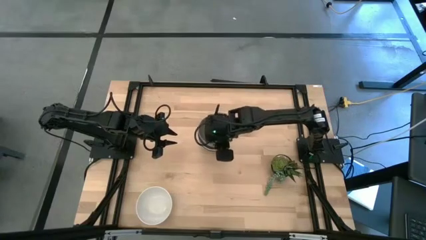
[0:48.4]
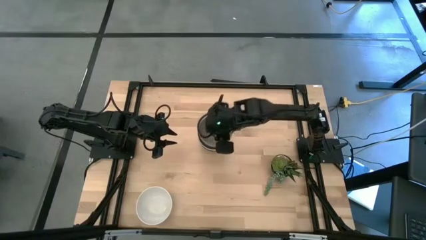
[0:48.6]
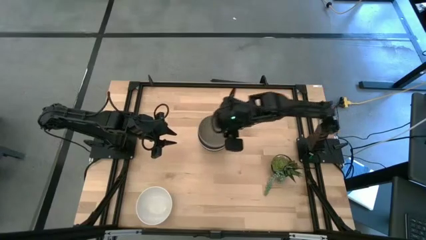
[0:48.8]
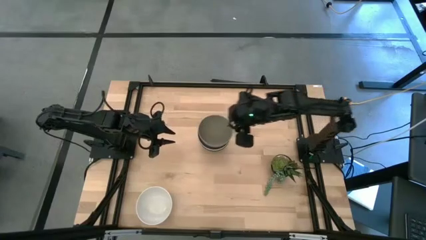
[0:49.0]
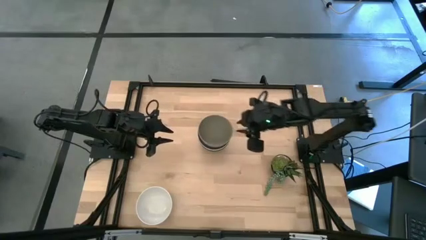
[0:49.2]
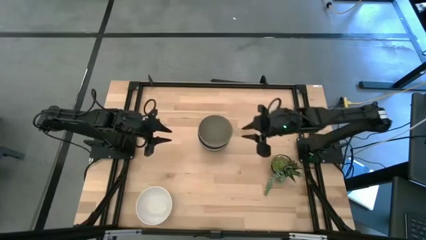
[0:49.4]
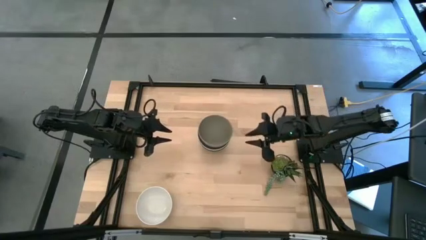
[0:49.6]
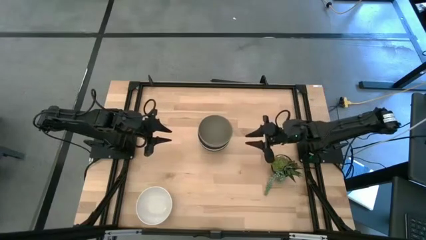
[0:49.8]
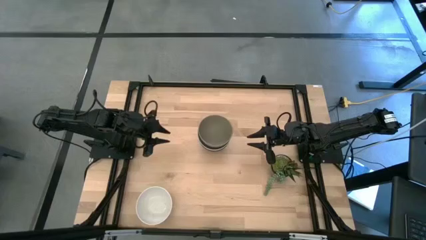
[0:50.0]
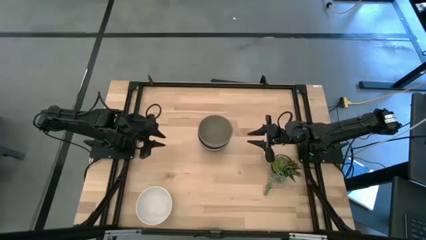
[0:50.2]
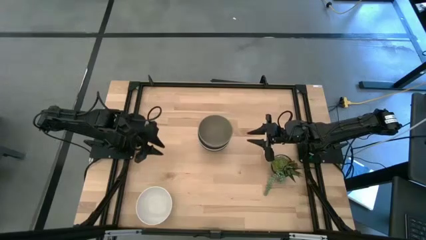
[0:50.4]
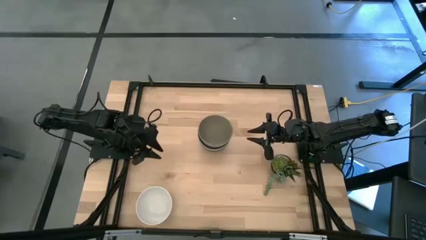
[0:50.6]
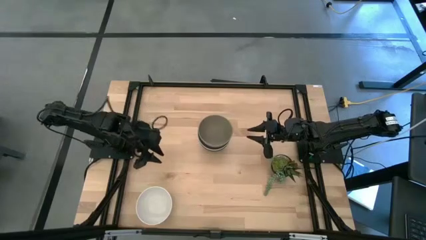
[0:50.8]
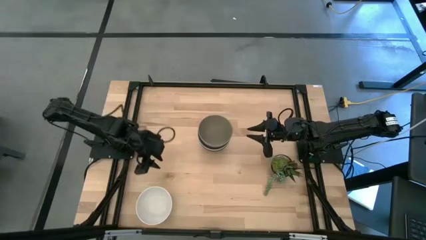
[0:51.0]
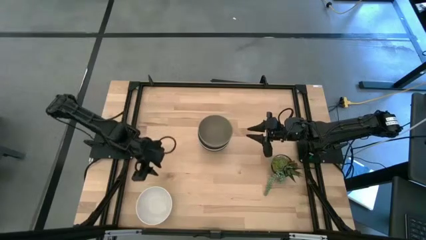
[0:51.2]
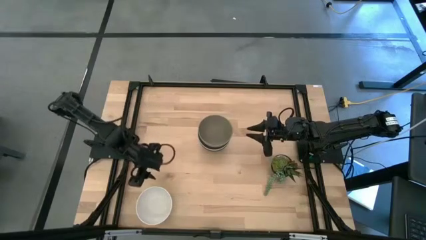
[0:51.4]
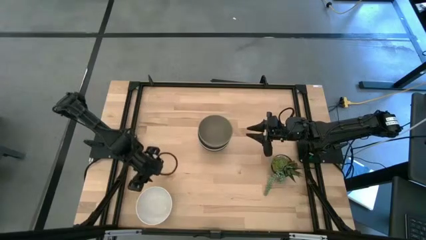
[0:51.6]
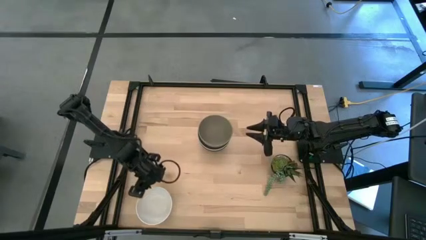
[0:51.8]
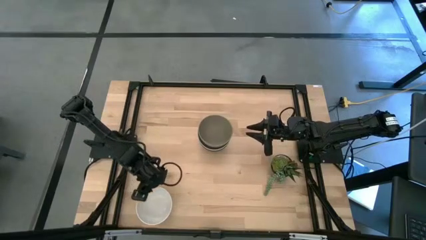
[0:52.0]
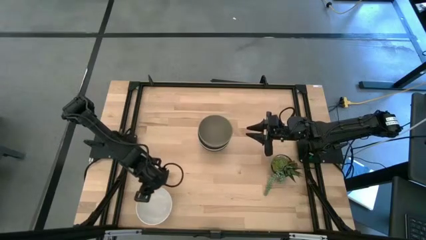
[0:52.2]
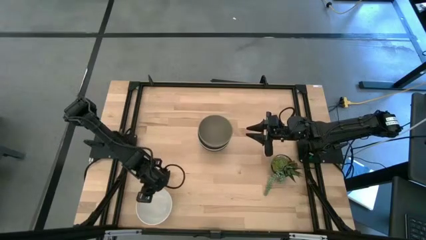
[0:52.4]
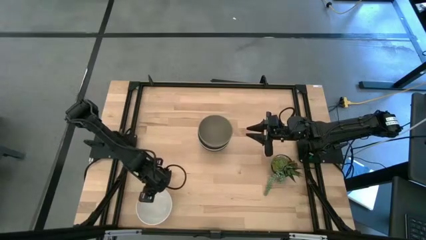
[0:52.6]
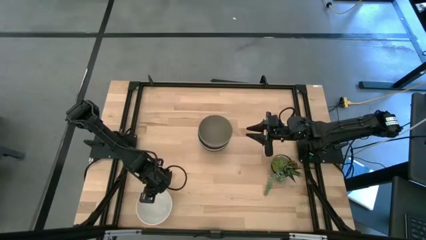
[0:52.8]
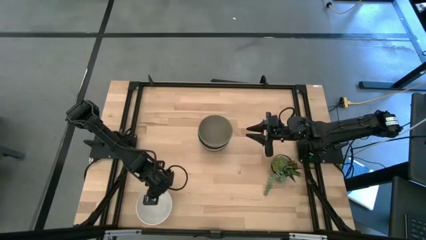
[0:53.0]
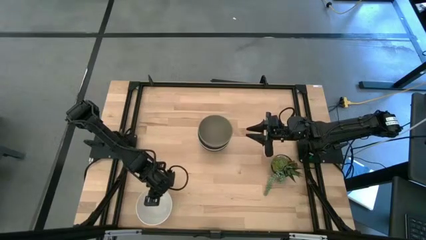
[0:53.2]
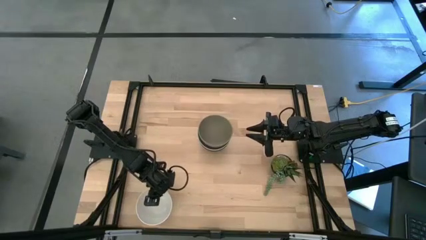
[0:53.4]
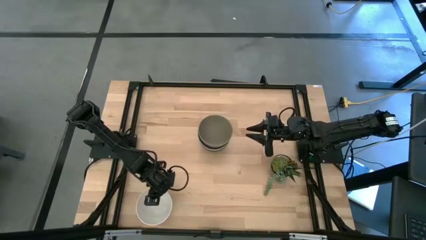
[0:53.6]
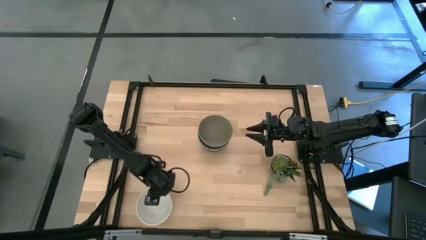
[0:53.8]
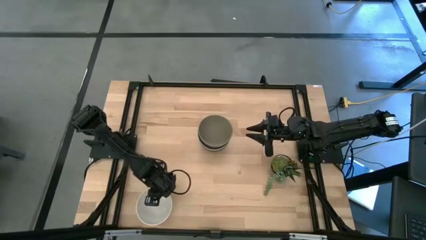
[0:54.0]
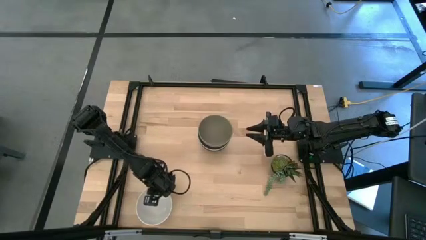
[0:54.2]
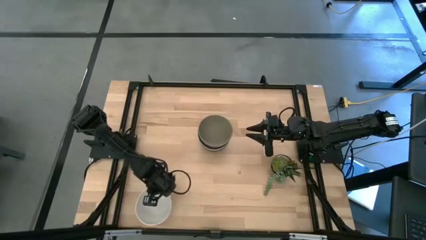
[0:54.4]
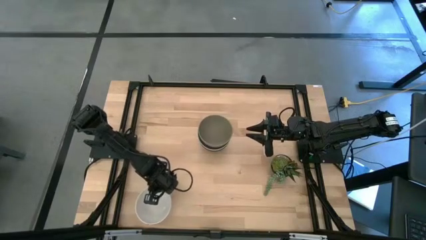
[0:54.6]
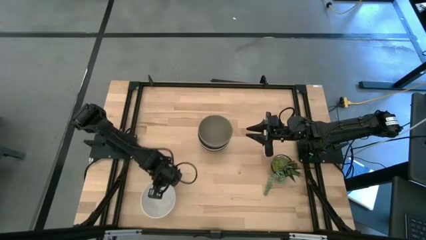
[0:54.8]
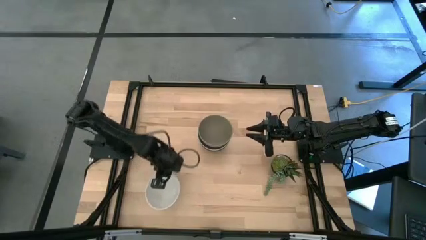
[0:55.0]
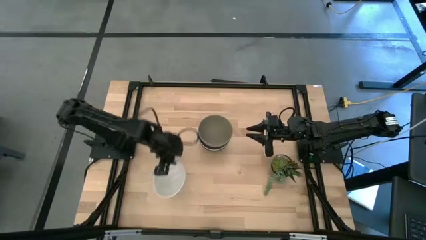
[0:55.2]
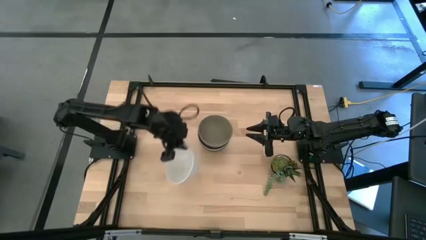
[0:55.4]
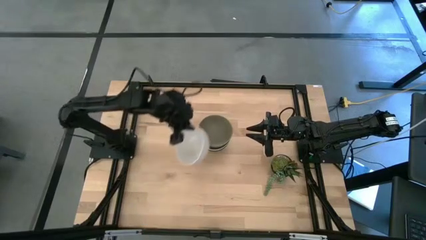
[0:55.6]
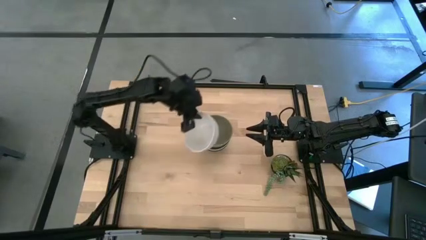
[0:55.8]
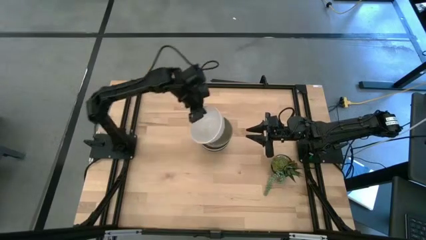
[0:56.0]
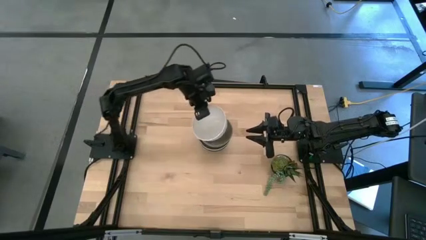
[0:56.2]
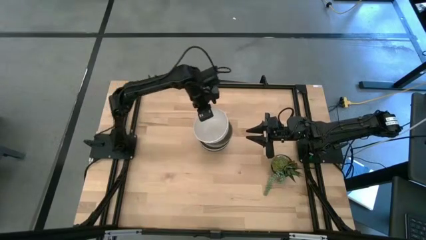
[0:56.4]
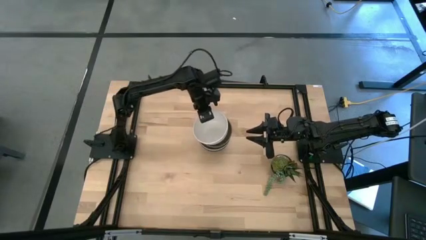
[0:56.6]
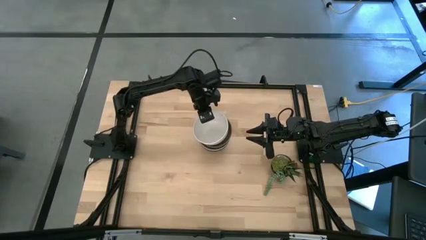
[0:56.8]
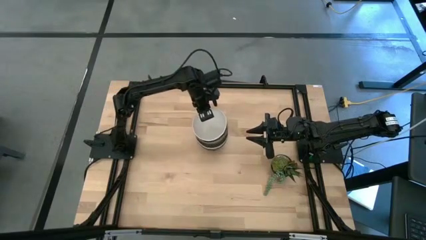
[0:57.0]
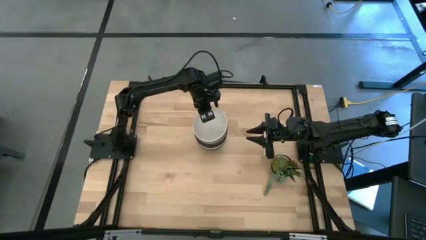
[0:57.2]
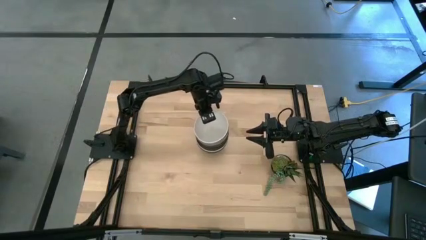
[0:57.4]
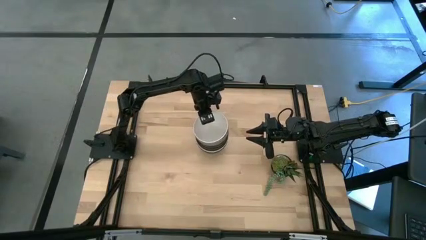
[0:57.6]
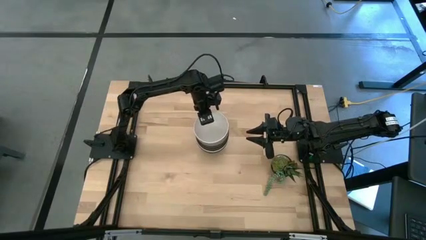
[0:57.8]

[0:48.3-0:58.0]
Task: Nest bowls inside each other
Stack the white bowl on the gray bowl

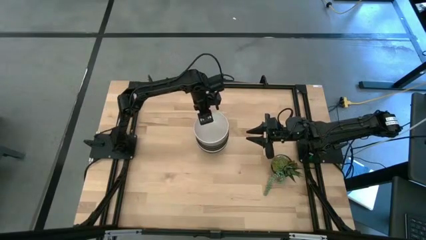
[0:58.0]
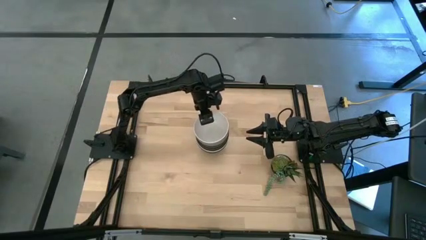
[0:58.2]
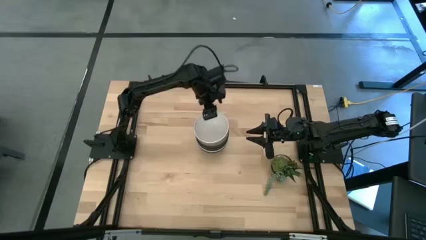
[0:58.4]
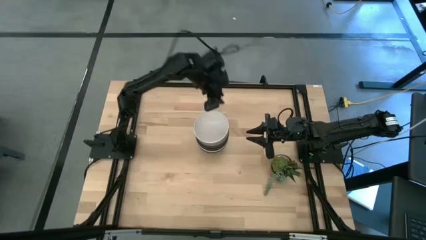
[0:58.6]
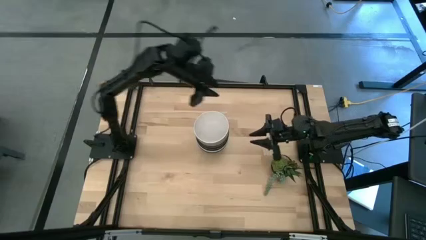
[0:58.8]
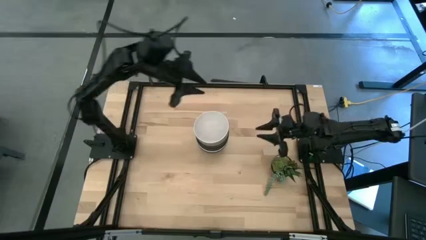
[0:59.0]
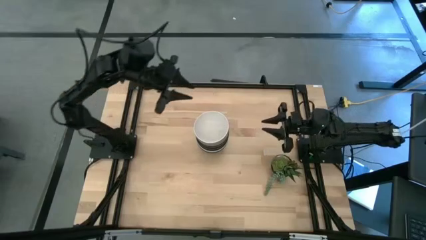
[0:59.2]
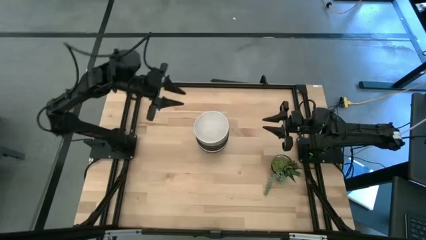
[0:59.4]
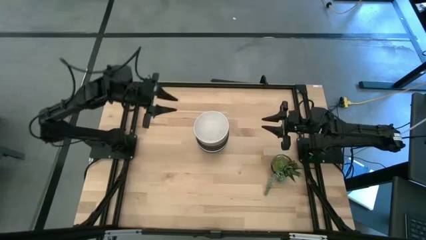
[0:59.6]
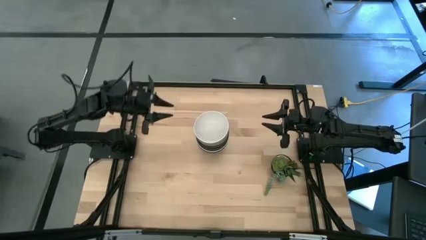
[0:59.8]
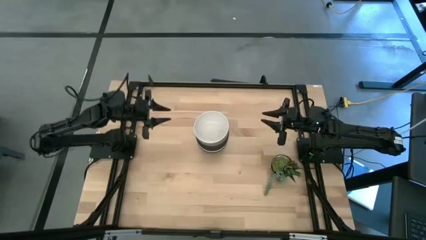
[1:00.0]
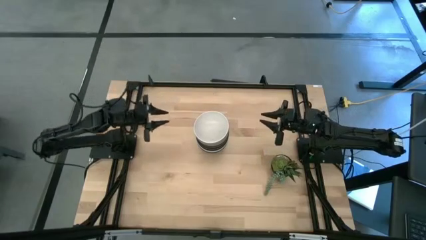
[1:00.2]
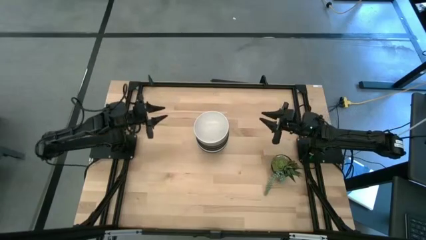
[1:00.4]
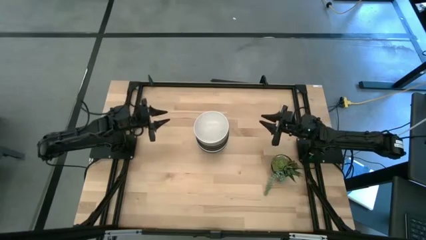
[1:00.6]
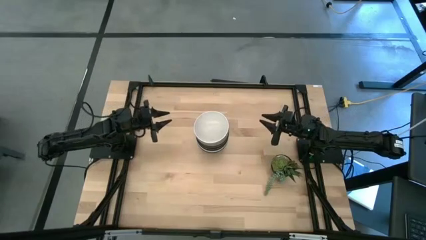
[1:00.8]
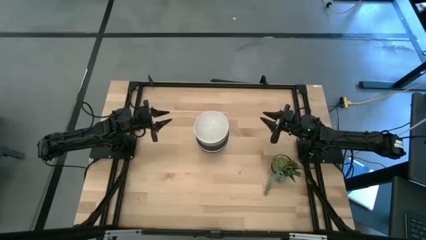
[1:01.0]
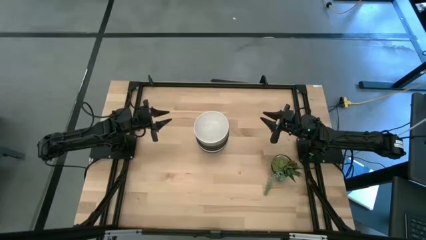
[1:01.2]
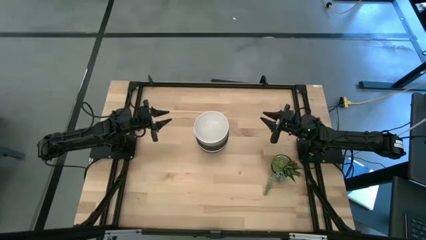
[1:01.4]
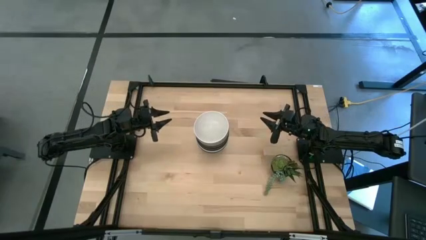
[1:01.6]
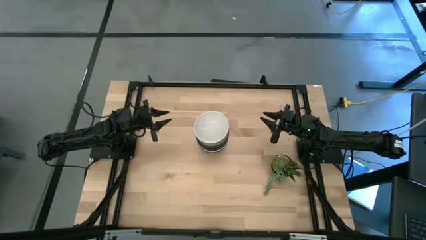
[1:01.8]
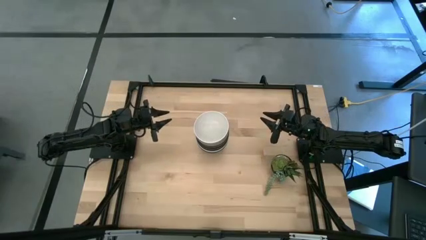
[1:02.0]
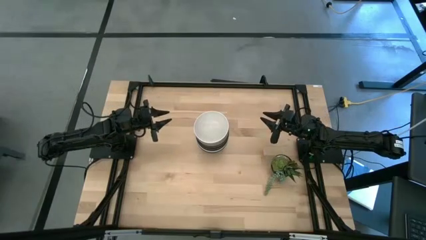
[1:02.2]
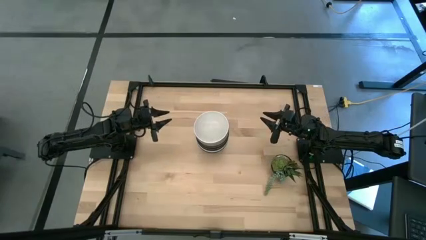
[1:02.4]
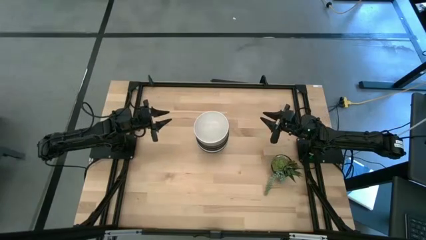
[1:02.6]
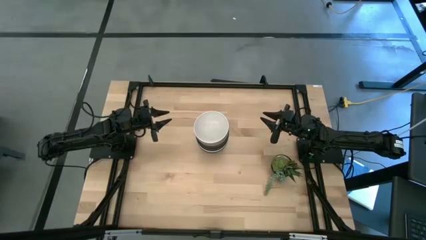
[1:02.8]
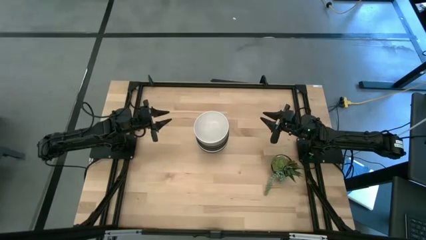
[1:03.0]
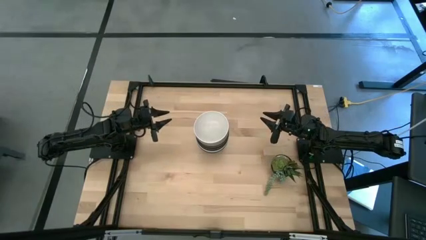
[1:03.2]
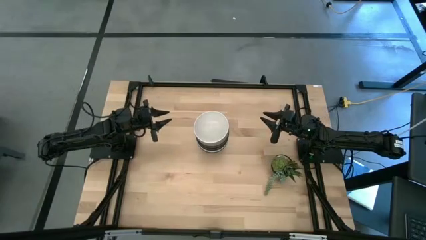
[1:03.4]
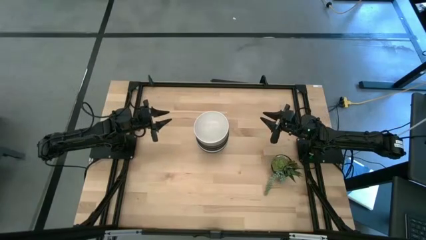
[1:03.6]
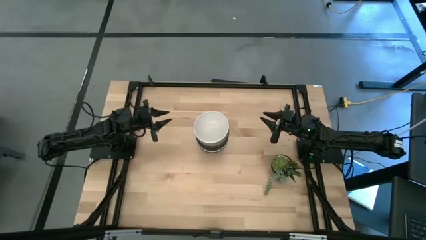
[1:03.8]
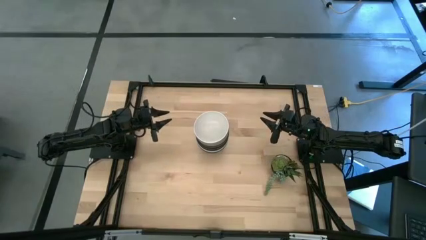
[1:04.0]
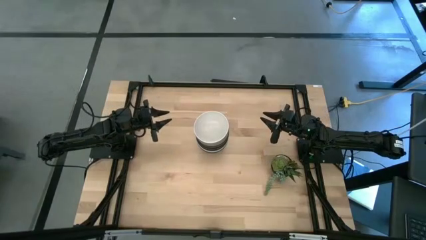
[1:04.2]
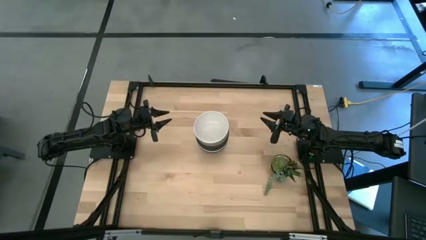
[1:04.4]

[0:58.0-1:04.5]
Return to Home Position
